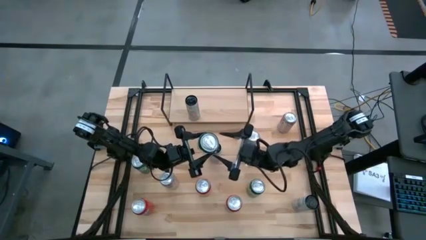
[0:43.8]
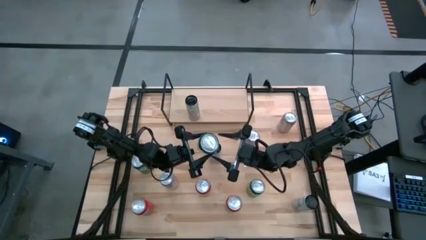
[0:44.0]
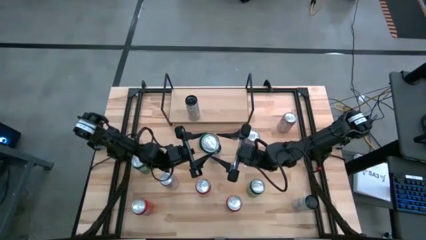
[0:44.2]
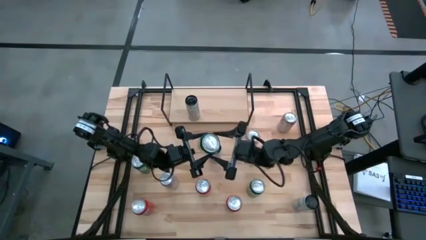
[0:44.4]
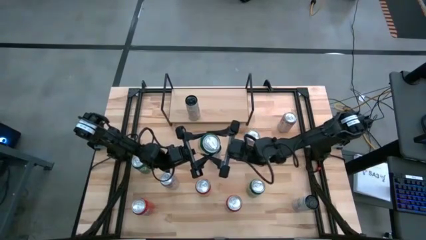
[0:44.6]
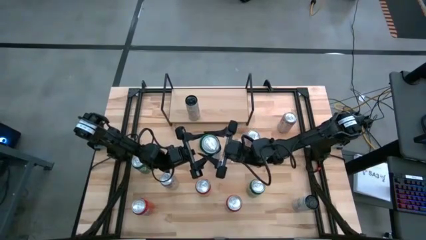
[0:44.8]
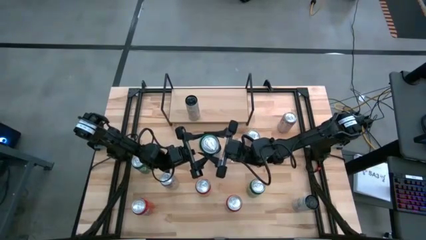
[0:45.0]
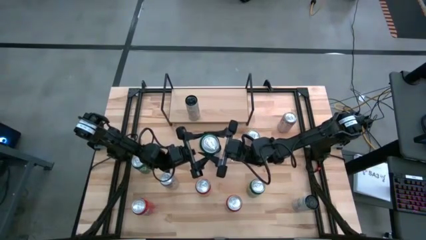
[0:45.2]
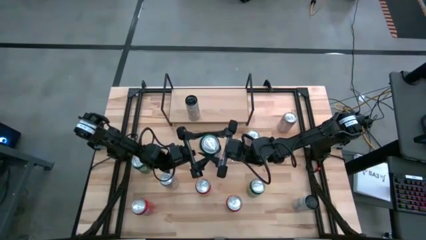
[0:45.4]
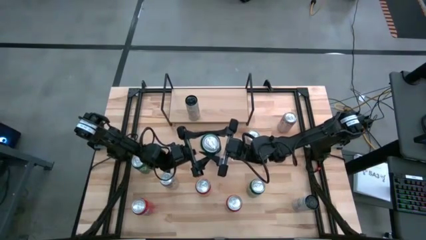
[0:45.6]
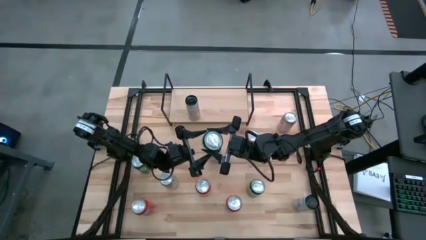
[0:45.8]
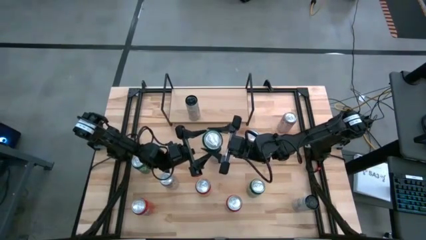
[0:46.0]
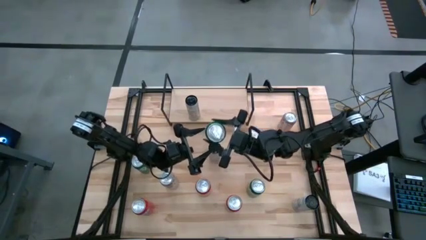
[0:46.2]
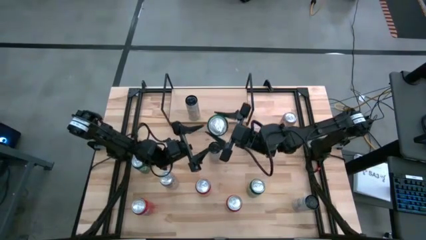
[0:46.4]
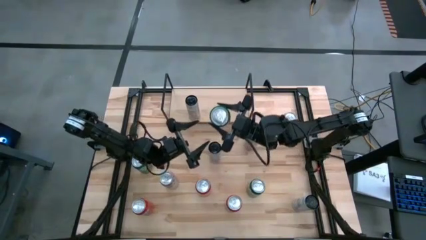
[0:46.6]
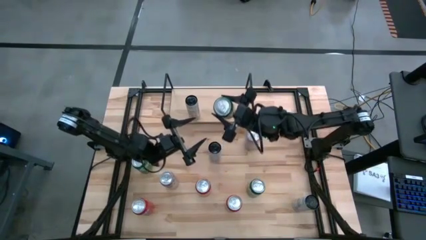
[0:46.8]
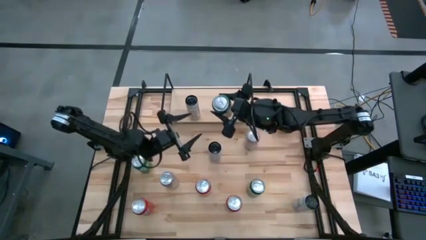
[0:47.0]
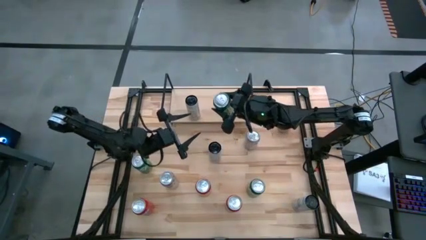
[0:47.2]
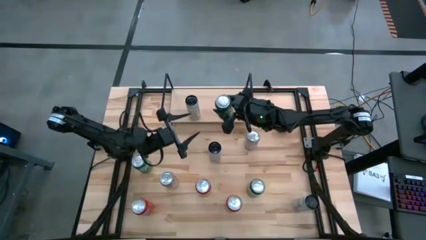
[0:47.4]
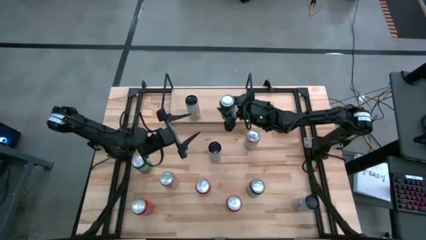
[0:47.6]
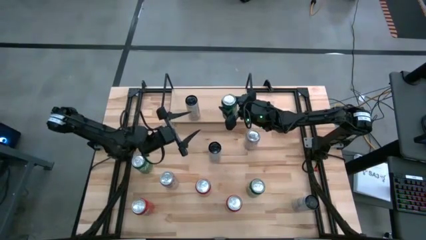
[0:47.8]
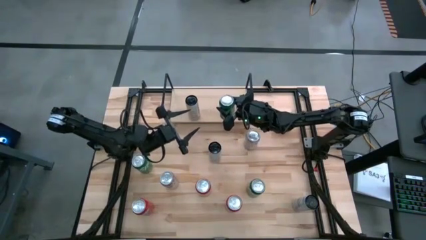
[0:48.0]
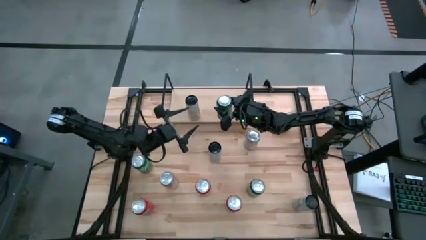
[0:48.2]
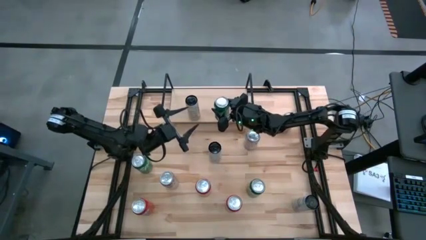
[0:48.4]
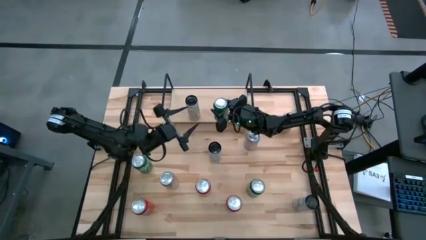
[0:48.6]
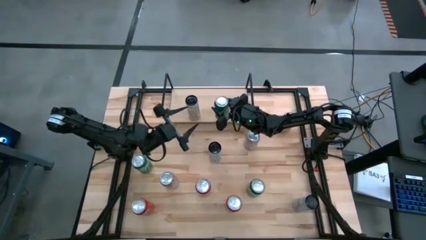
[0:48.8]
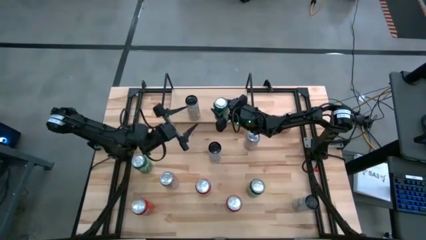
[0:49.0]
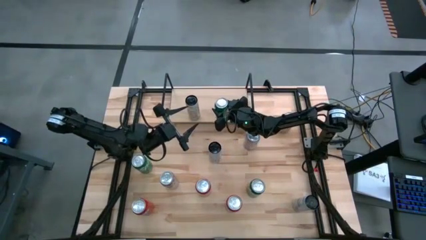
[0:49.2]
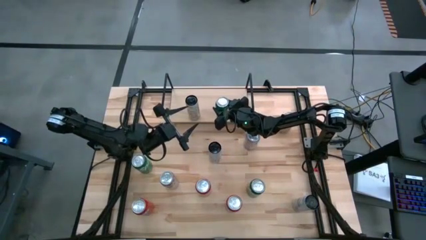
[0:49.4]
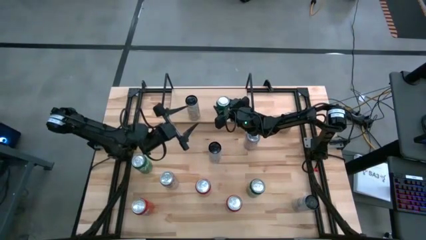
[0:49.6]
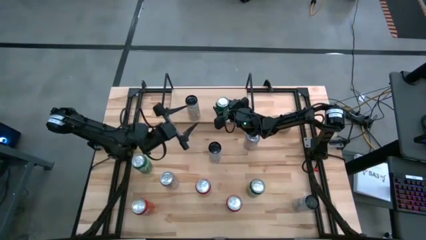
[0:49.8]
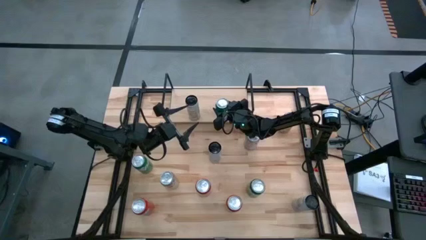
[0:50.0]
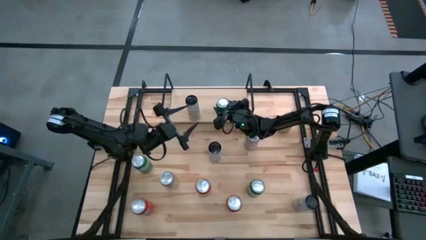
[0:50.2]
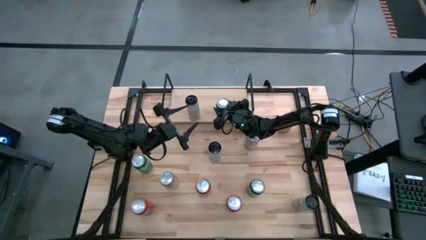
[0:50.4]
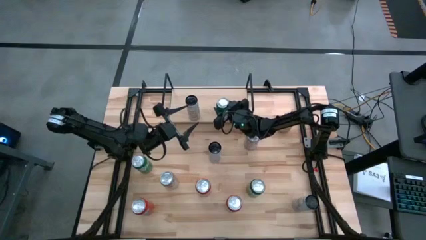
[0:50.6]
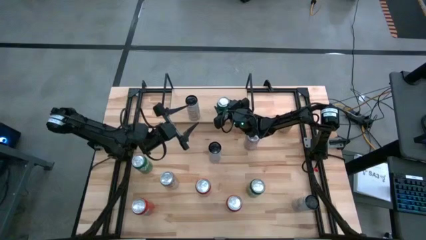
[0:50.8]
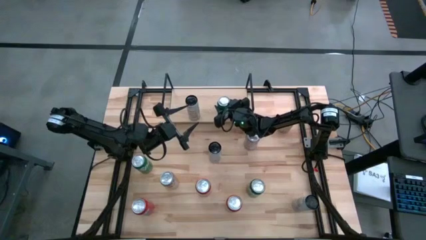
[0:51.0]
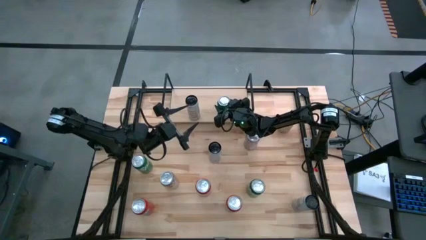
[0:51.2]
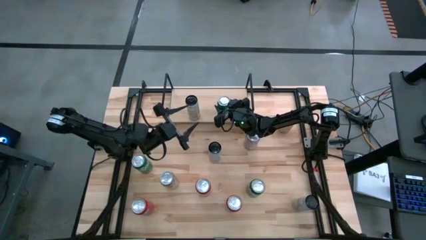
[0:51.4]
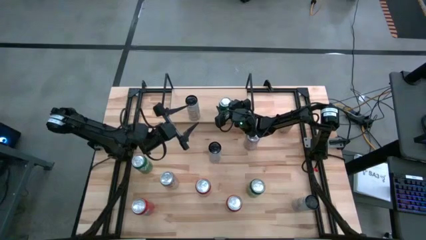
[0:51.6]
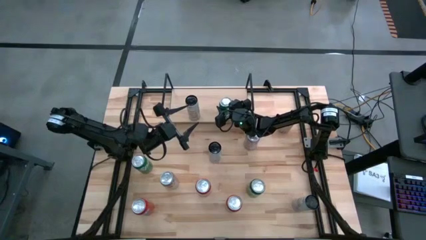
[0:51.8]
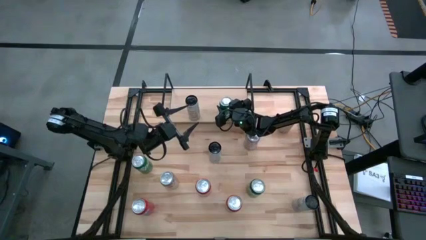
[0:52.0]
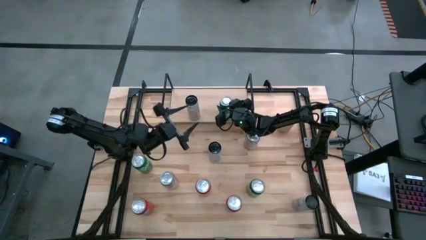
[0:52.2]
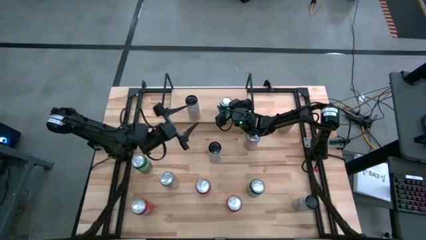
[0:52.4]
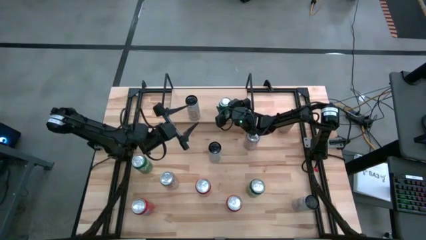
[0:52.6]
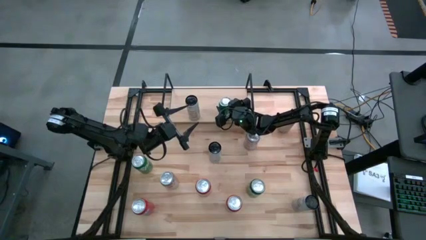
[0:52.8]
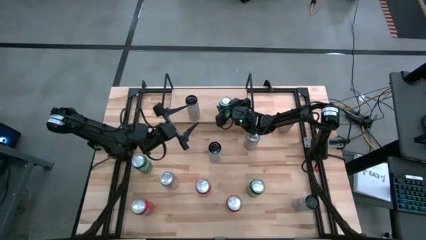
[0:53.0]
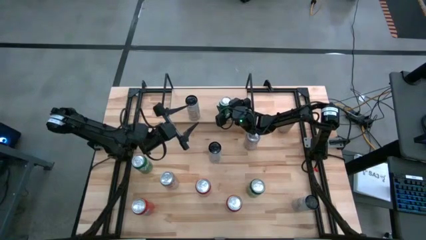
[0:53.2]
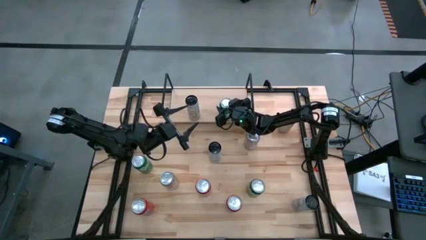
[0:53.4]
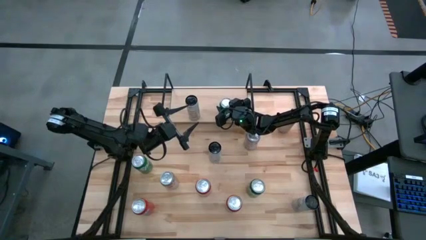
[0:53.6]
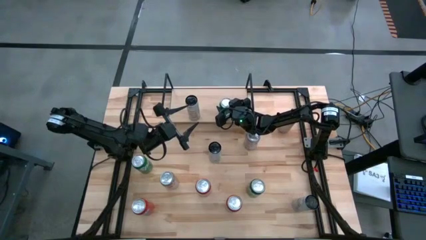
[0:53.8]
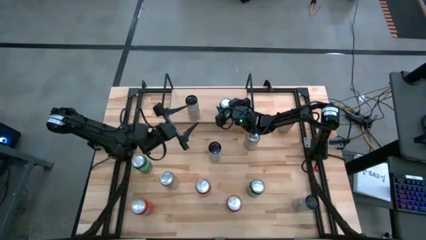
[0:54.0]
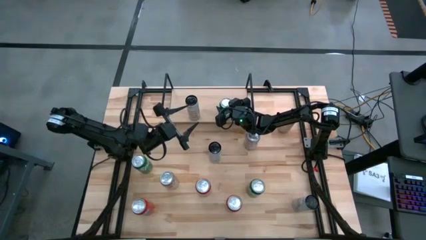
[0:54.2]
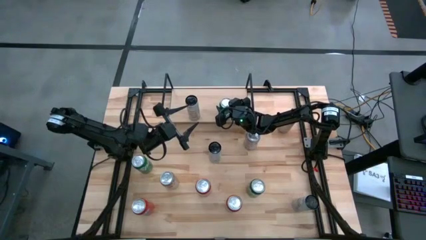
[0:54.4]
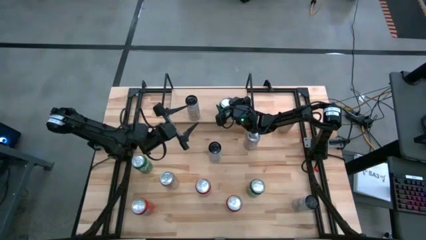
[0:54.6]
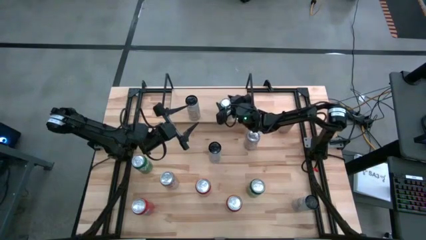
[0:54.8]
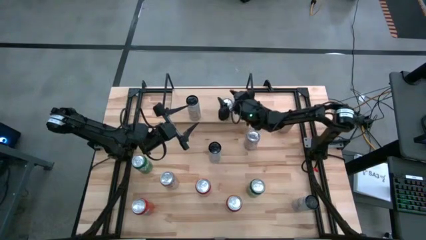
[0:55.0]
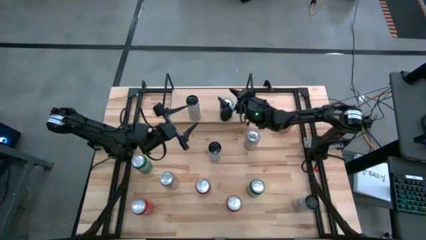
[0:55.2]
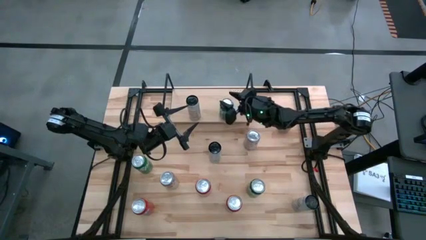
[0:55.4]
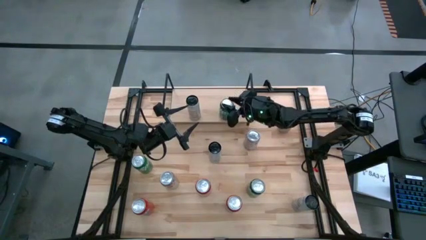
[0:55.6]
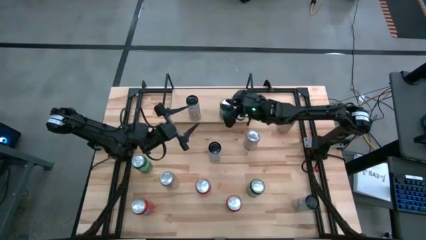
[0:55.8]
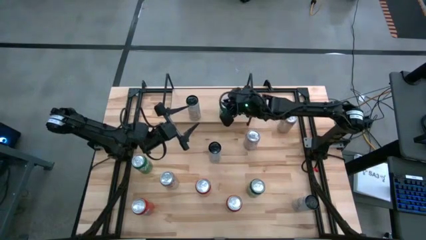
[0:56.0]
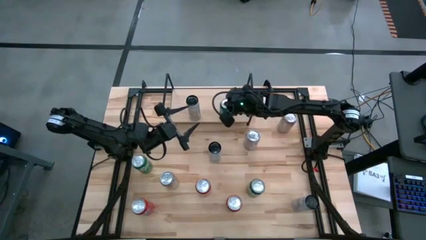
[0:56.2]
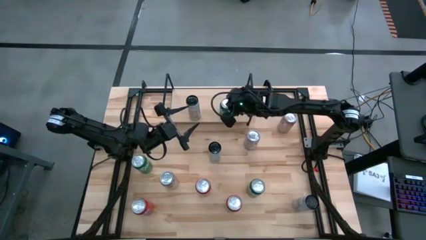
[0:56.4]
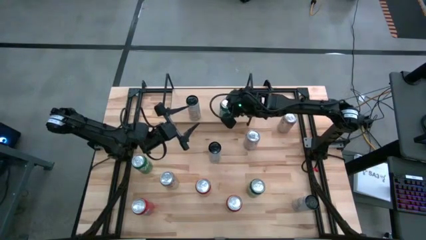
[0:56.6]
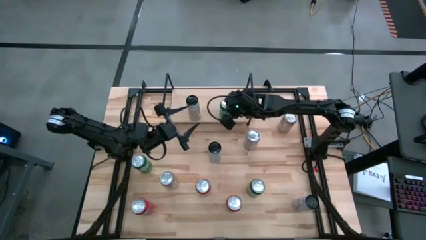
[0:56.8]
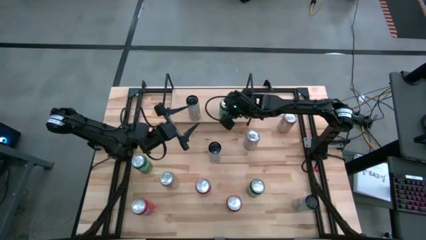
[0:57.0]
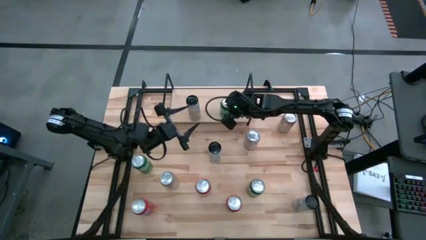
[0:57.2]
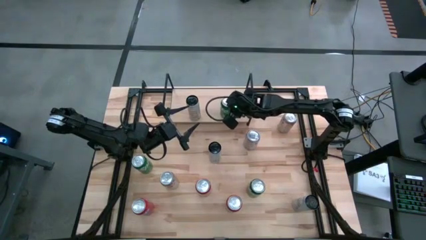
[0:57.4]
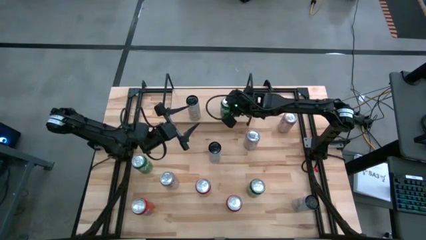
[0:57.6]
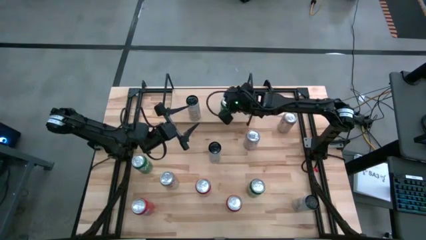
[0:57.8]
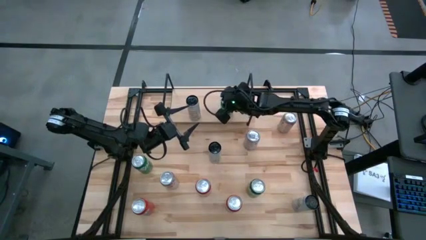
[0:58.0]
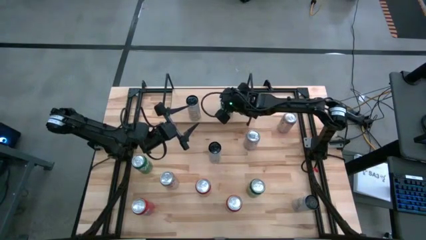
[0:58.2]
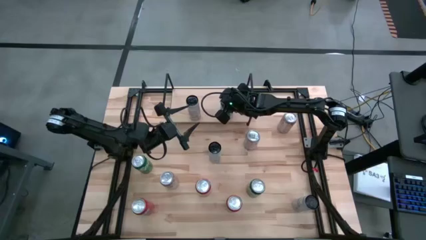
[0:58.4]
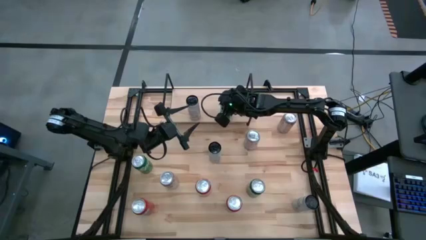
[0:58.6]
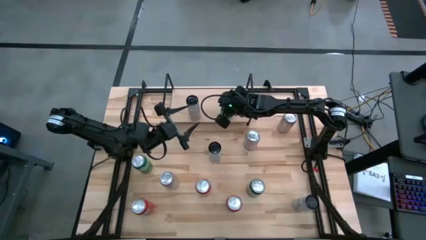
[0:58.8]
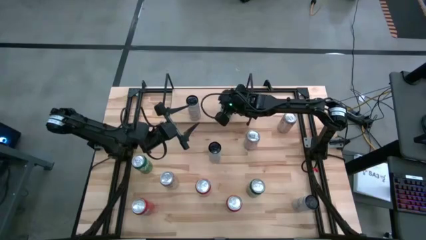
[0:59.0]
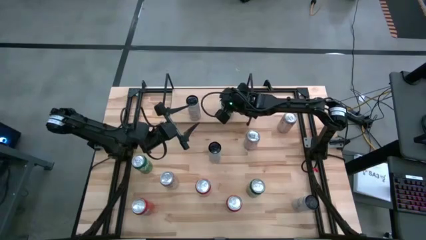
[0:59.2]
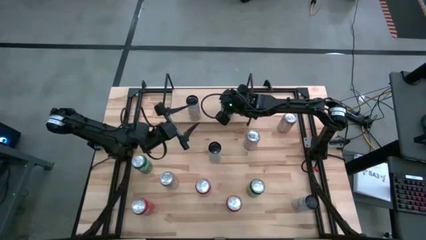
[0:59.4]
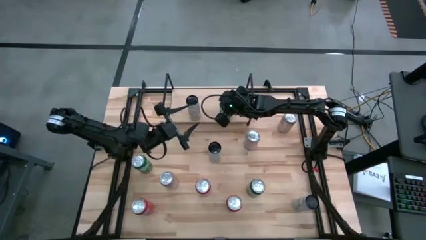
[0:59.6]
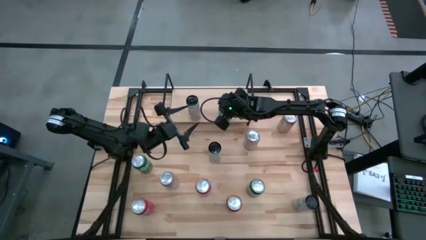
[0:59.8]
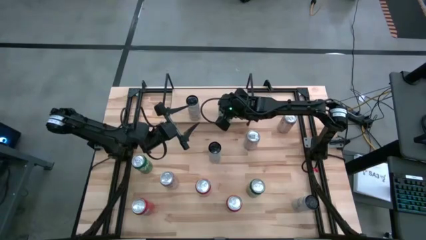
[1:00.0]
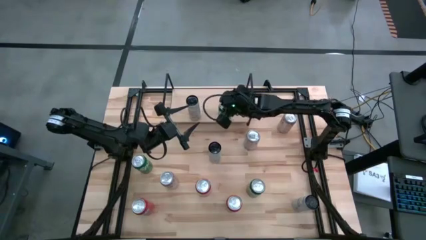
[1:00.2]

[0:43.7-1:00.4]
Task: Sort soda cans
Put the right green soda can on the shelf
